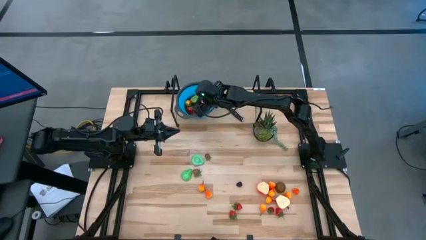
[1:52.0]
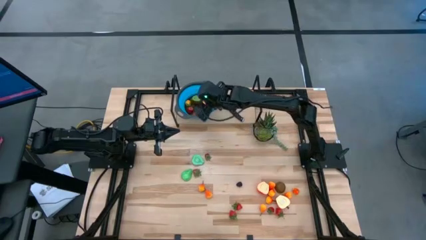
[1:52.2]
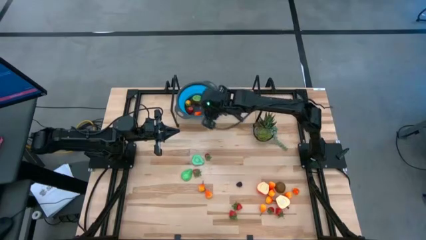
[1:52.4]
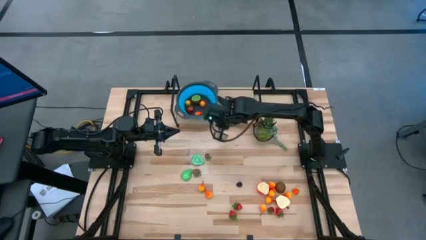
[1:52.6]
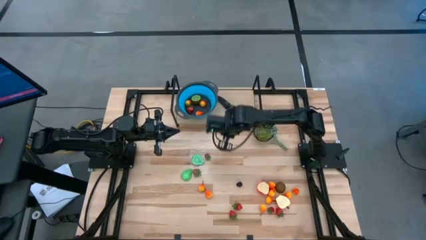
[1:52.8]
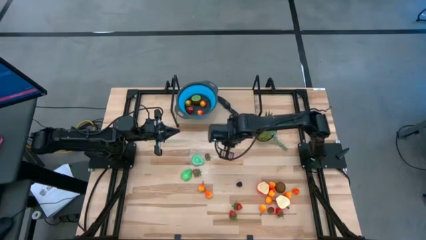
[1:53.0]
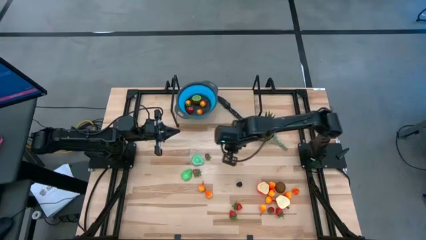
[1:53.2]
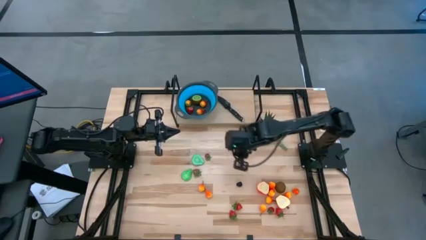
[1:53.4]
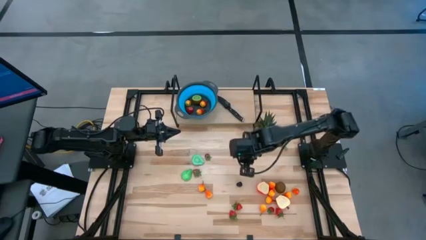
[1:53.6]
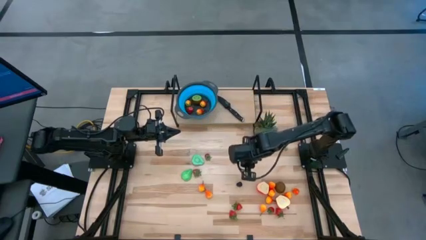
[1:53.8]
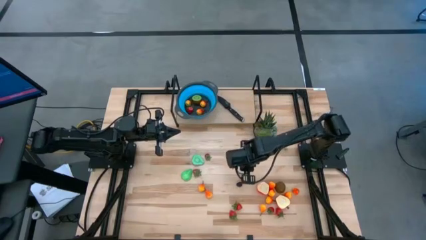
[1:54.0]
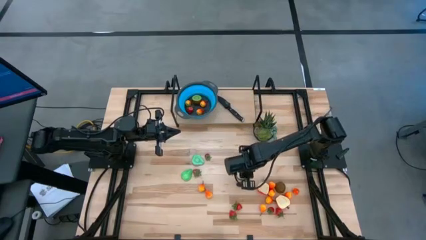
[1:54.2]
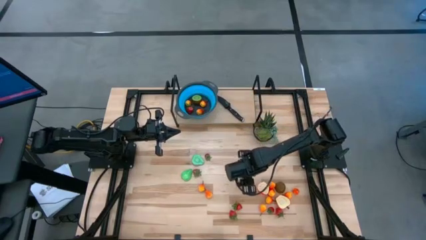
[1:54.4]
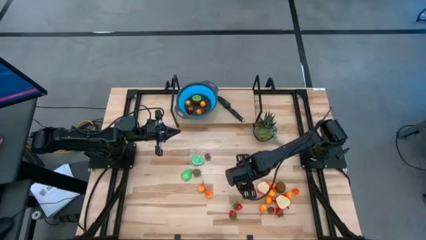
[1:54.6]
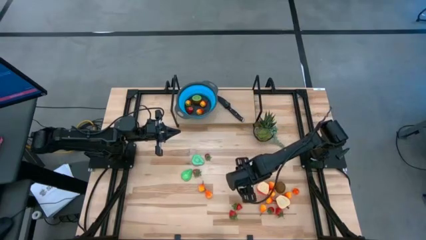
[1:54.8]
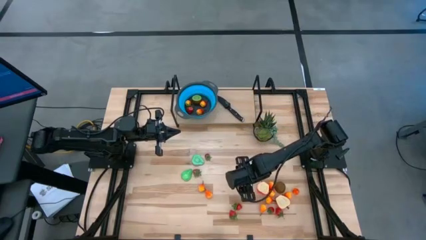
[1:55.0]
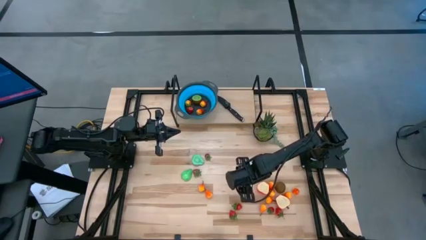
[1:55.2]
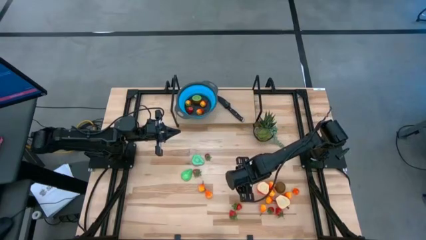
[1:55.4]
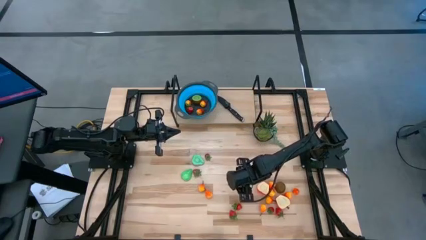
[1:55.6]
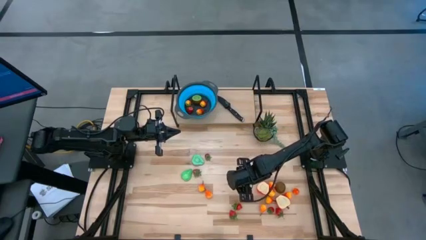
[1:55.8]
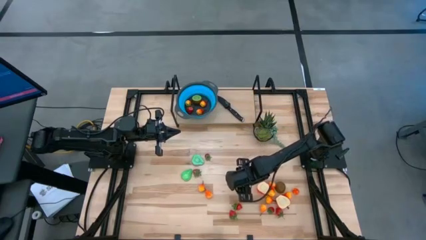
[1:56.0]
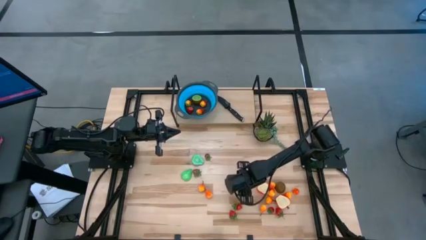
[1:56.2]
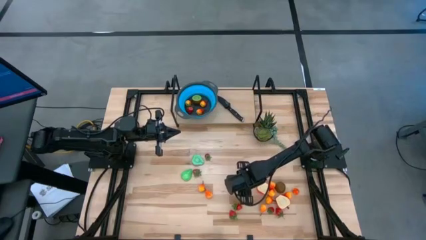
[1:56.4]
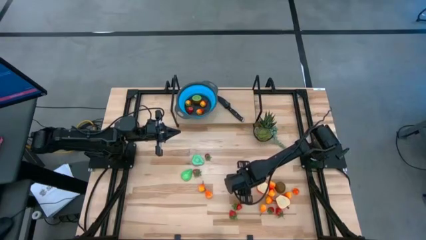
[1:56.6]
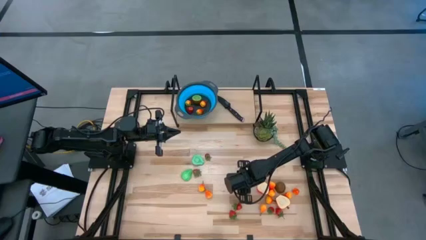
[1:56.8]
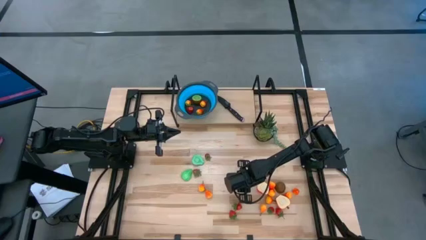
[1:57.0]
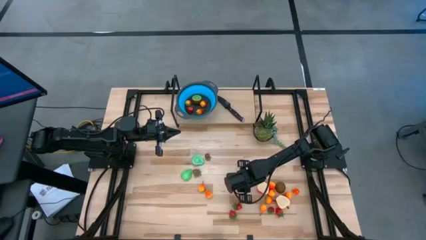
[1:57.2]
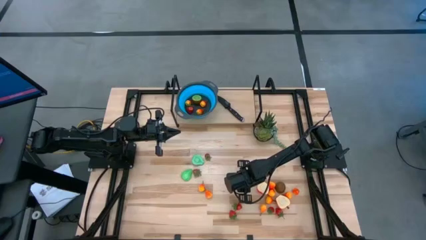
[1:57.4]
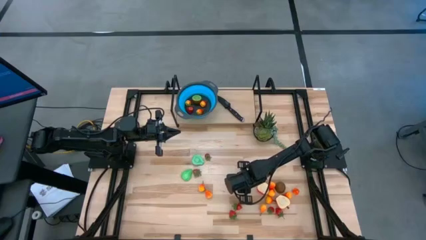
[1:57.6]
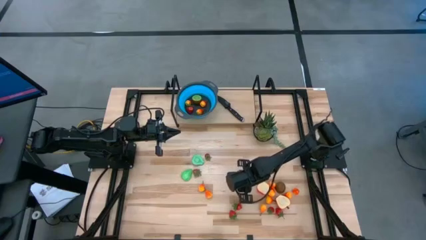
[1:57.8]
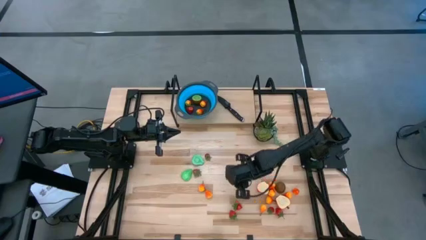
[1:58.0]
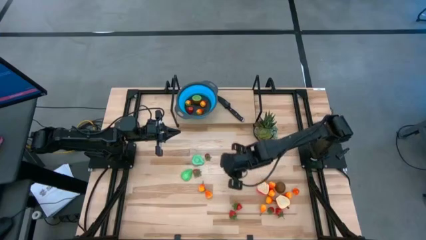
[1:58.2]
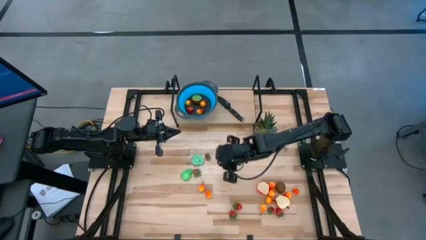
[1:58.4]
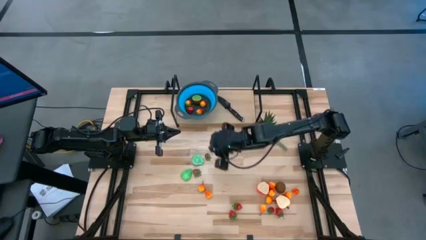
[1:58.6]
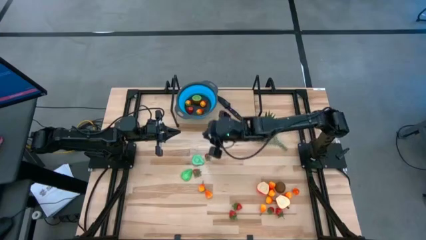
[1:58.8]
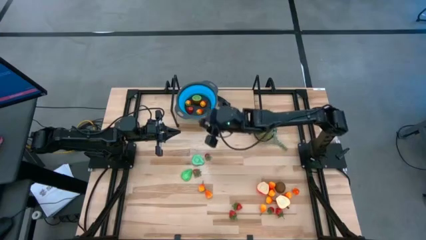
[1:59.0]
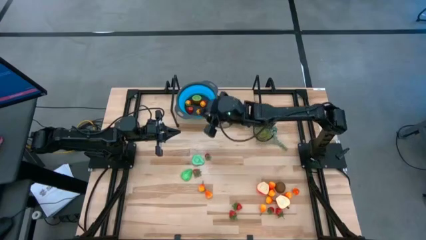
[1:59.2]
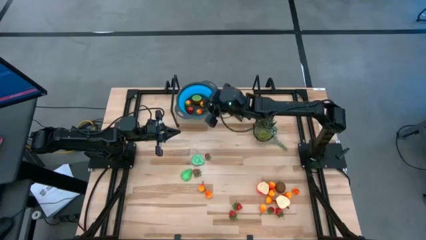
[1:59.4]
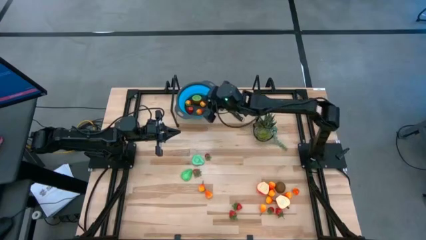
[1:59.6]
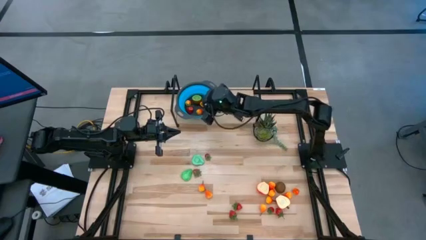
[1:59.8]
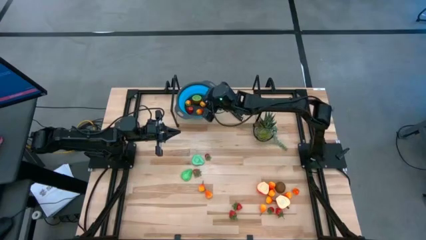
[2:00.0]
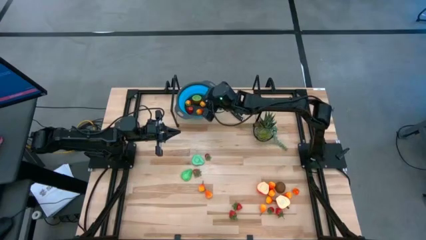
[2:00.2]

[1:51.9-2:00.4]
Task: Pick & Place Fruit
Put the blackberry into the basket

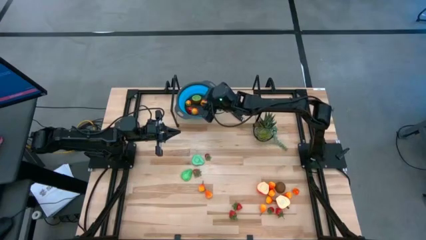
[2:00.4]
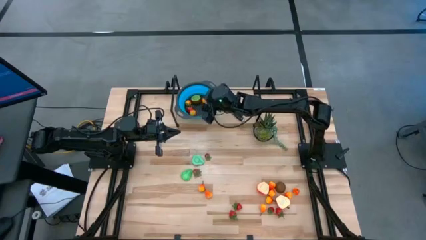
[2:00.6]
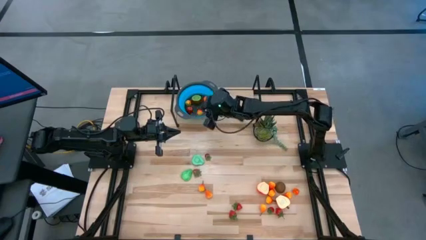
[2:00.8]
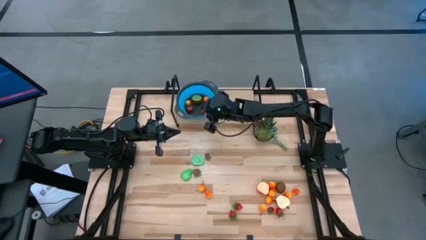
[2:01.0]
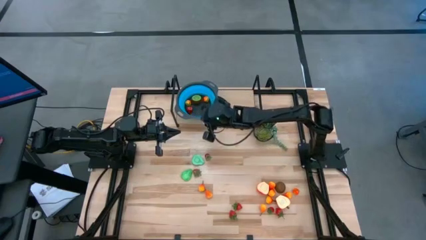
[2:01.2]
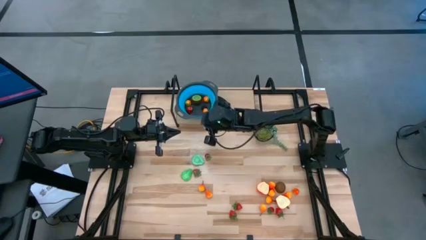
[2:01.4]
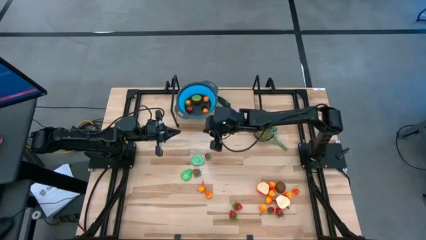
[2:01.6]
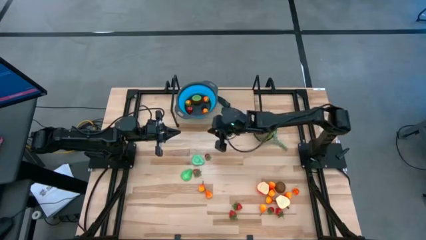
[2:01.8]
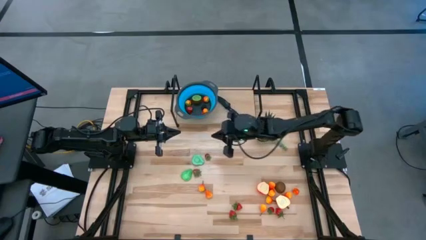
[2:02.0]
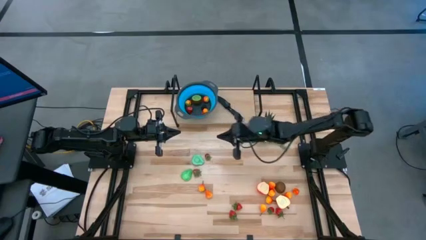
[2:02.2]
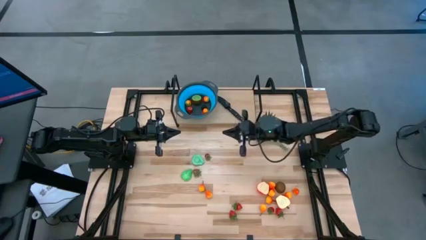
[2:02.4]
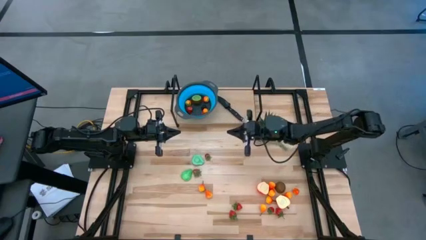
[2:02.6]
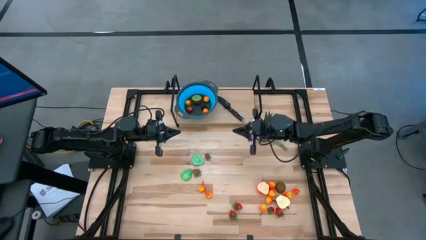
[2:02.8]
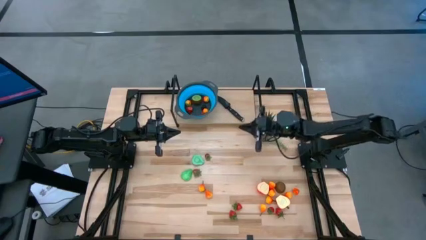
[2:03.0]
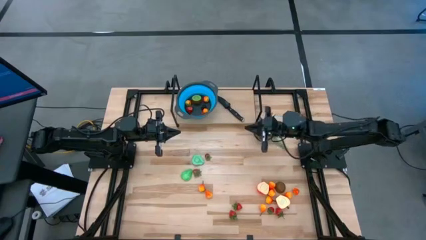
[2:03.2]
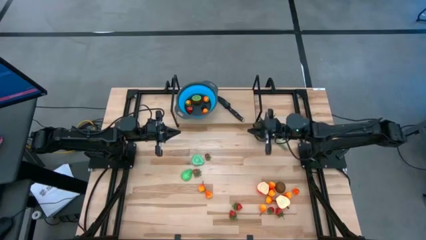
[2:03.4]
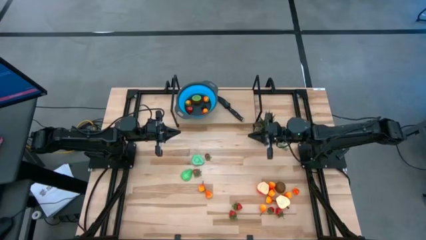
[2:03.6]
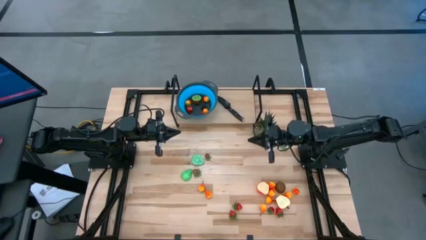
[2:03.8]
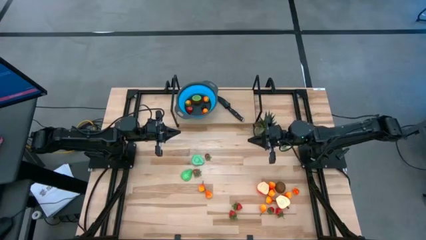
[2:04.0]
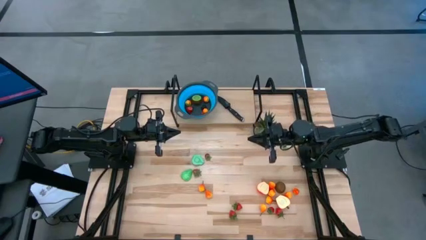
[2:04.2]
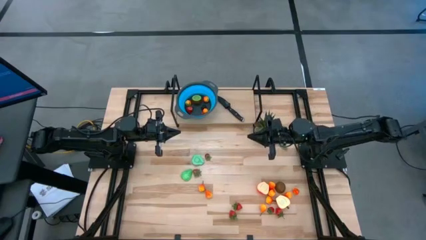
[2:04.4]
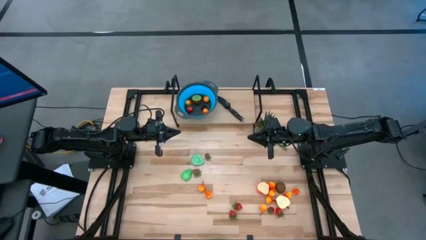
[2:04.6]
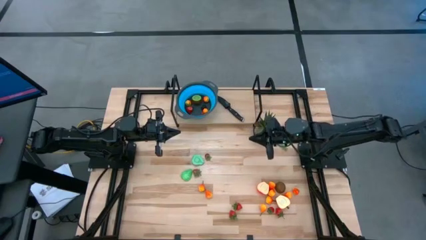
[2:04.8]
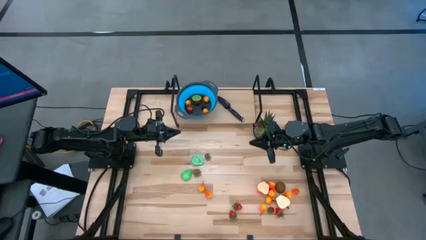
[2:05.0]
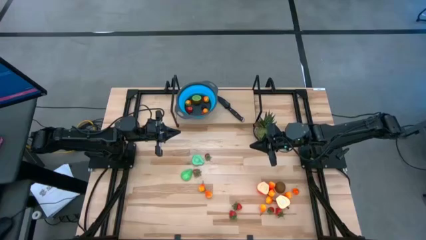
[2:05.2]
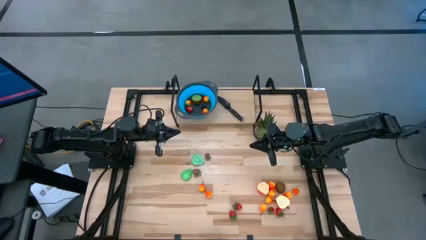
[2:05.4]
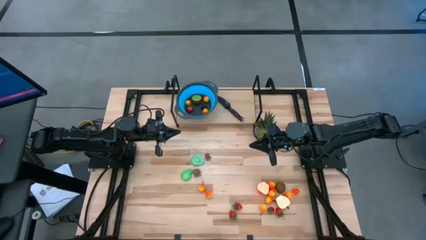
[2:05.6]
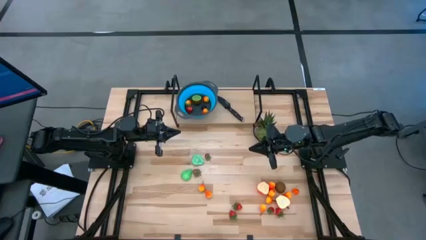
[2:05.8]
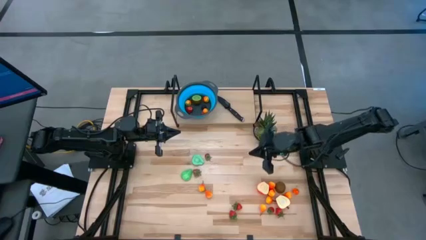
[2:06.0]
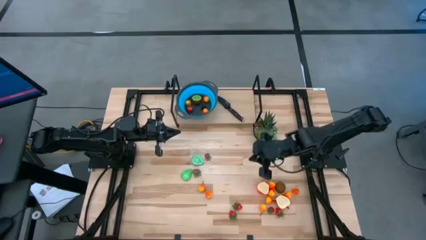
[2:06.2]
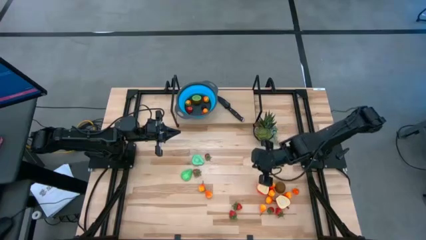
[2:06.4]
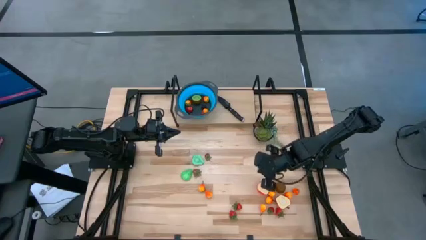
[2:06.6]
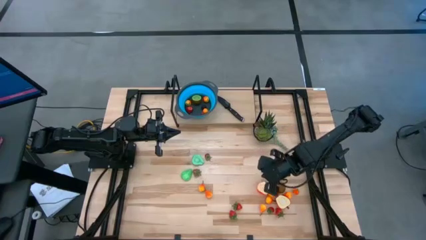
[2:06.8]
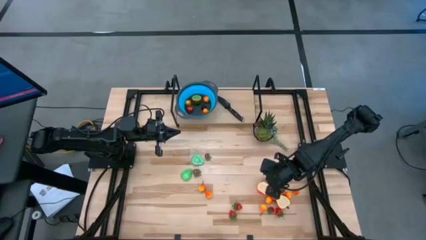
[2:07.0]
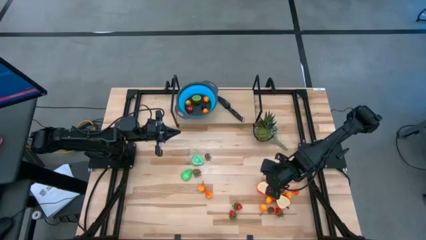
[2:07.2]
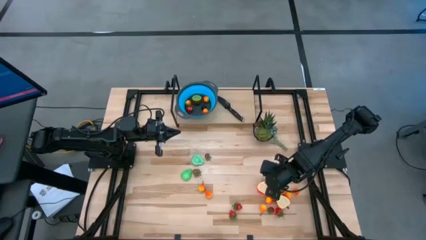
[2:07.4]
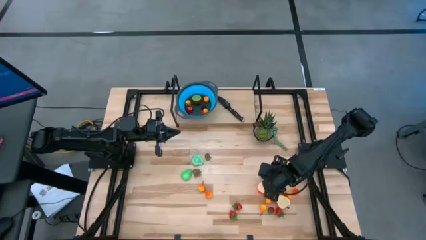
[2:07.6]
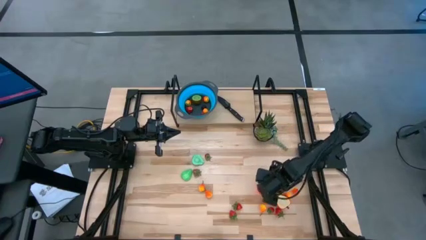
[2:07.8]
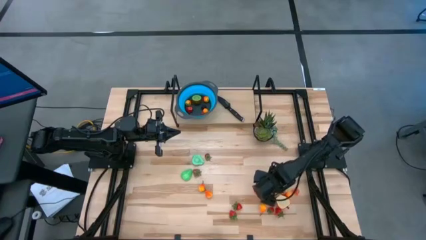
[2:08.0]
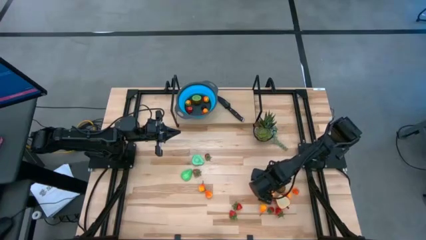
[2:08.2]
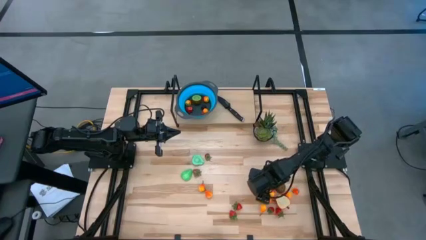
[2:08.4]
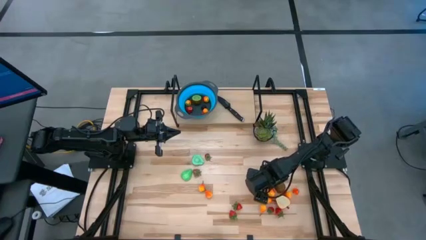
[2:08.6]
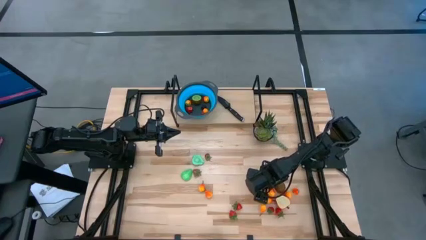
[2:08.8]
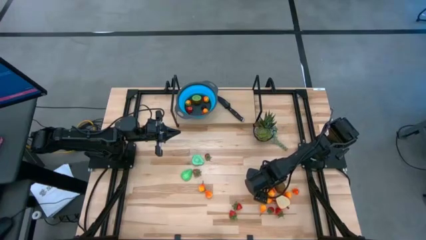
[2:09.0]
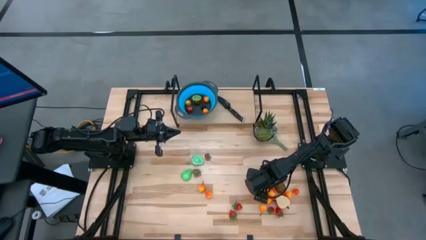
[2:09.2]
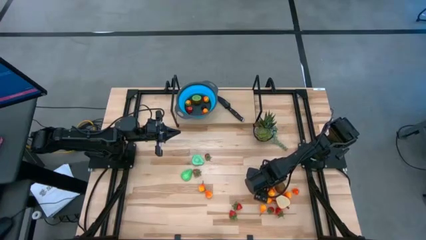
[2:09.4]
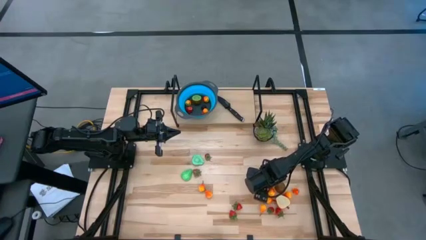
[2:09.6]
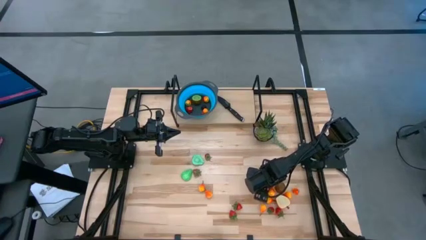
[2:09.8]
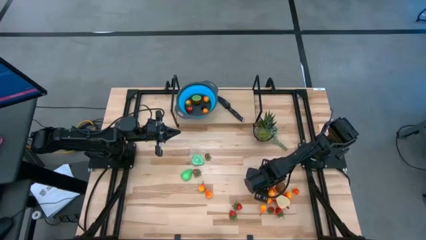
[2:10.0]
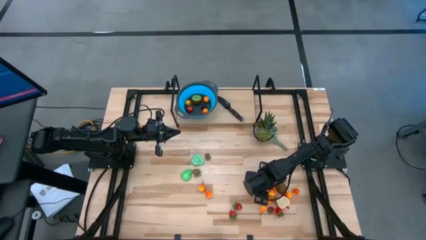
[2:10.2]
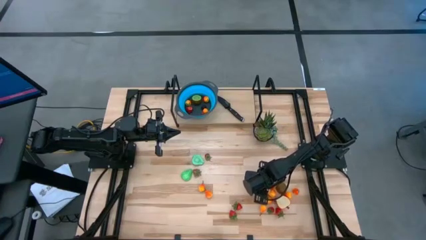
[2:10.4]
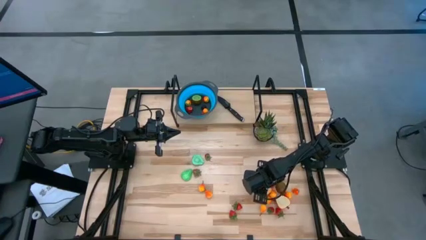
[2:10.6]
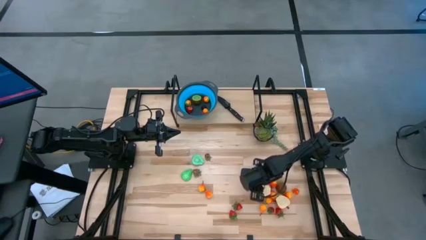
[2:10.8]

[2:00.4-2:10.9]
Put the apple into the basket
